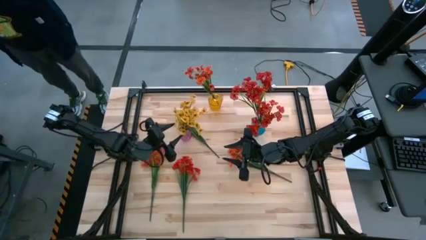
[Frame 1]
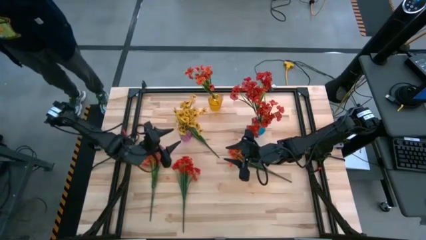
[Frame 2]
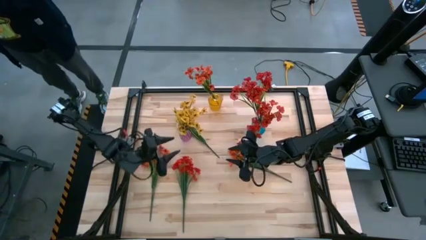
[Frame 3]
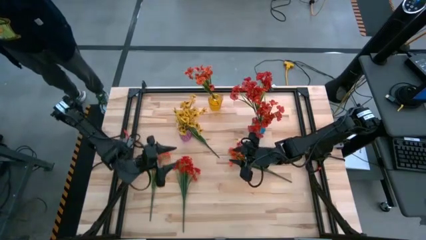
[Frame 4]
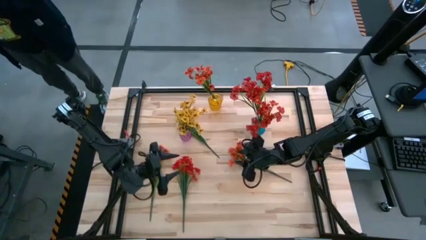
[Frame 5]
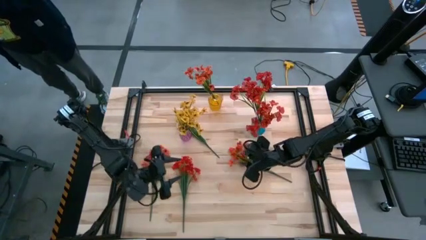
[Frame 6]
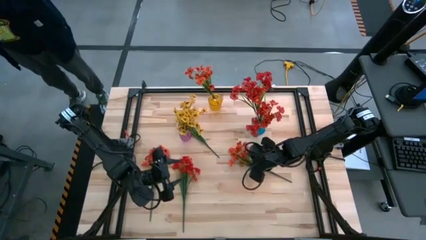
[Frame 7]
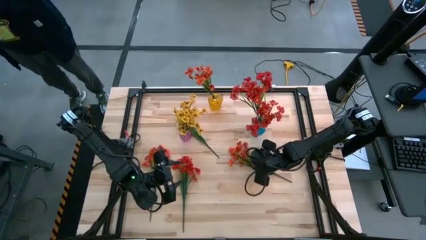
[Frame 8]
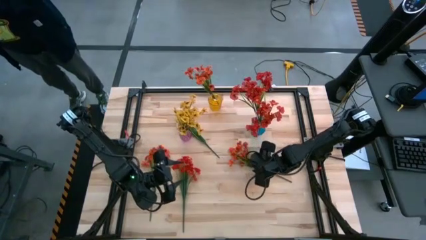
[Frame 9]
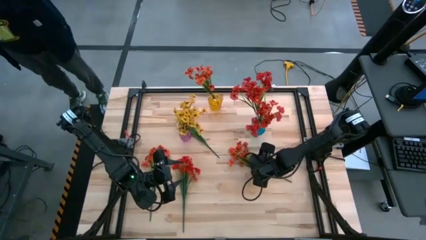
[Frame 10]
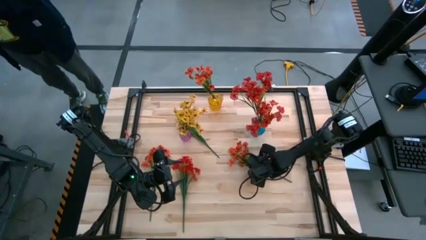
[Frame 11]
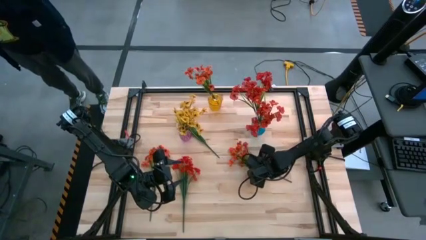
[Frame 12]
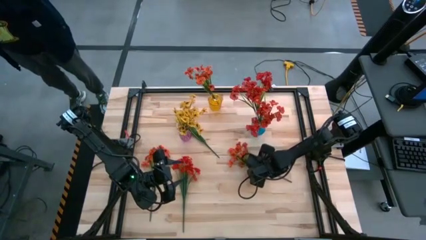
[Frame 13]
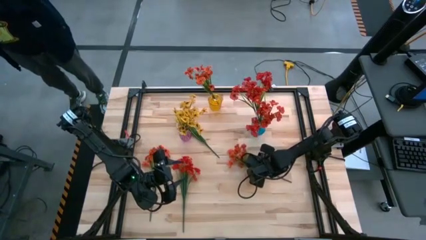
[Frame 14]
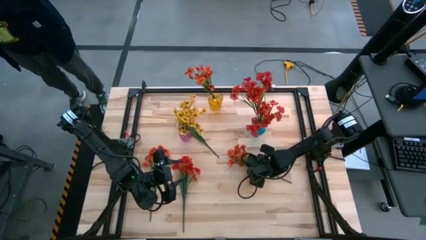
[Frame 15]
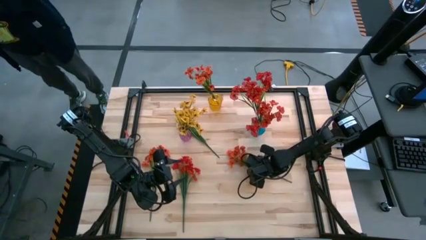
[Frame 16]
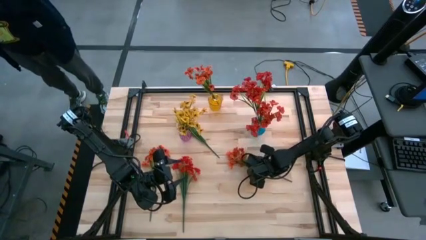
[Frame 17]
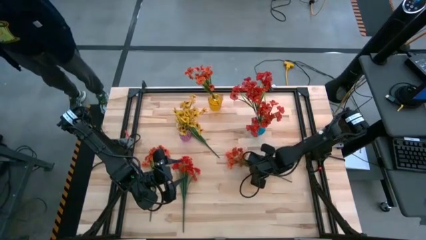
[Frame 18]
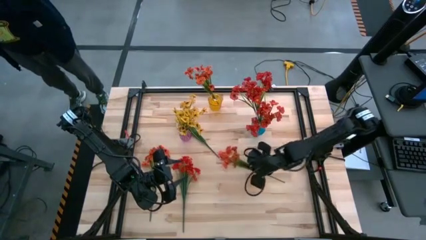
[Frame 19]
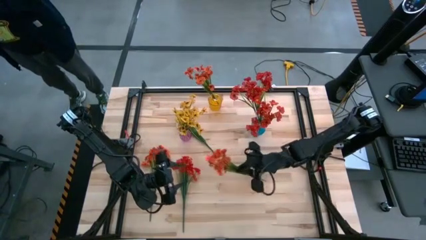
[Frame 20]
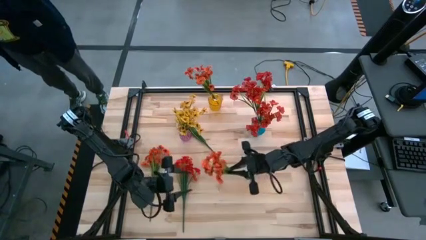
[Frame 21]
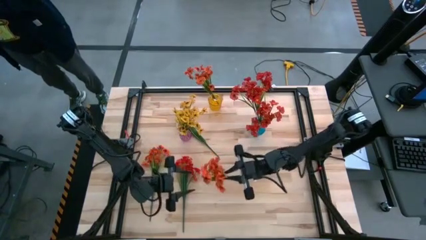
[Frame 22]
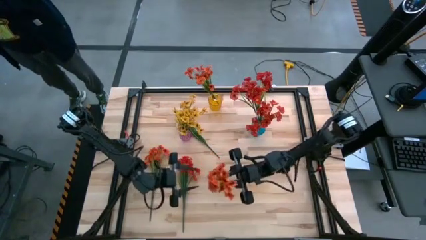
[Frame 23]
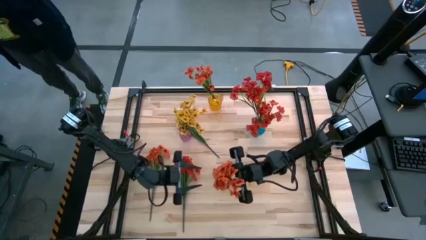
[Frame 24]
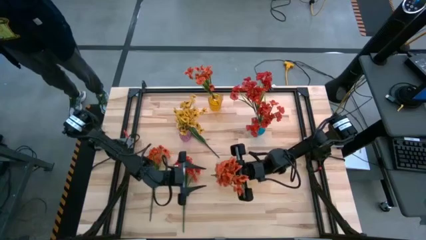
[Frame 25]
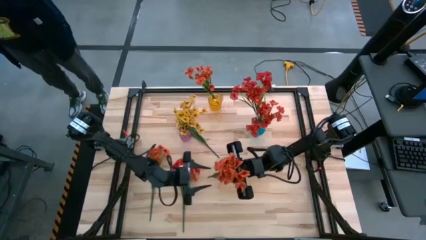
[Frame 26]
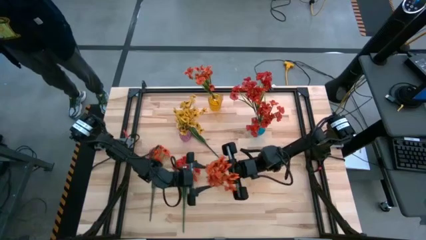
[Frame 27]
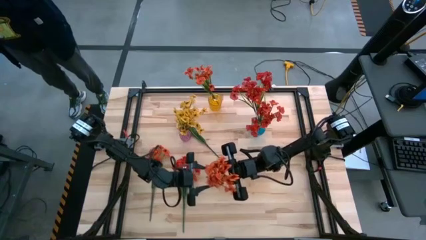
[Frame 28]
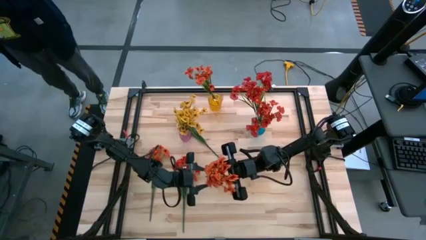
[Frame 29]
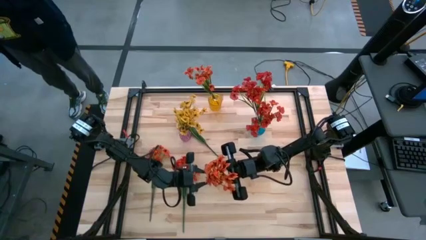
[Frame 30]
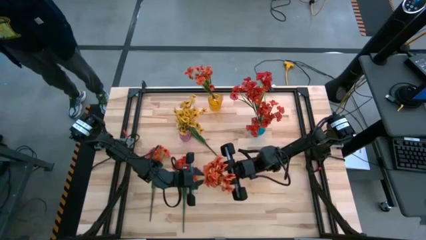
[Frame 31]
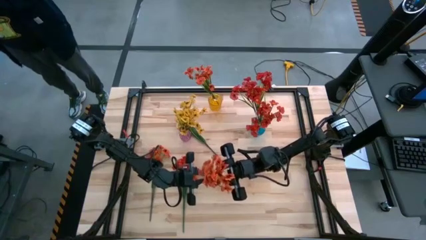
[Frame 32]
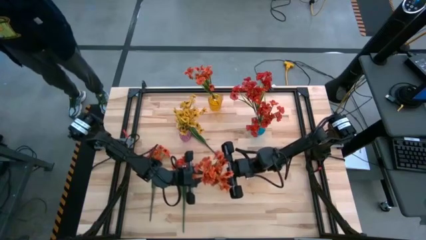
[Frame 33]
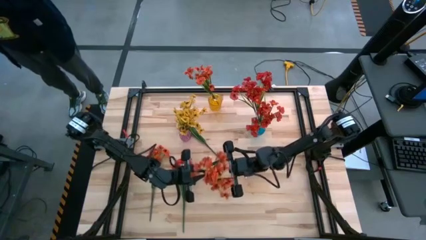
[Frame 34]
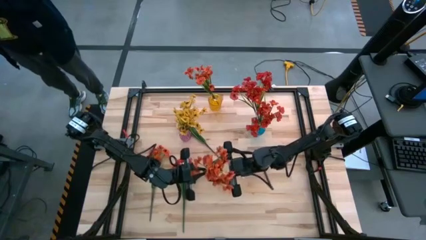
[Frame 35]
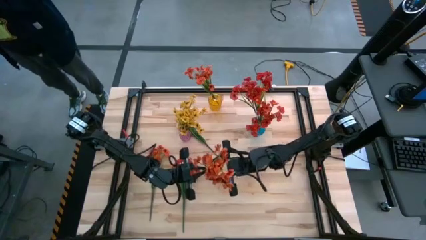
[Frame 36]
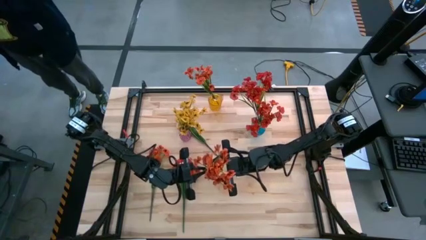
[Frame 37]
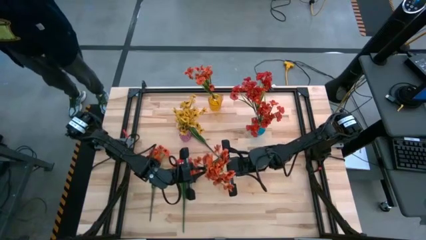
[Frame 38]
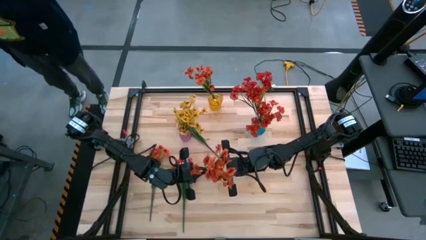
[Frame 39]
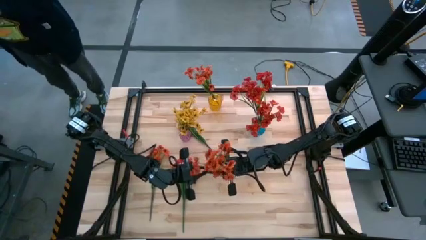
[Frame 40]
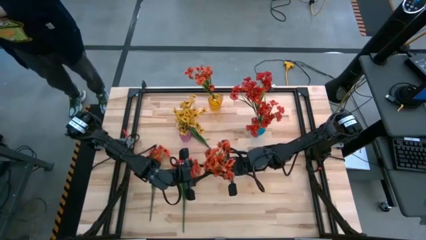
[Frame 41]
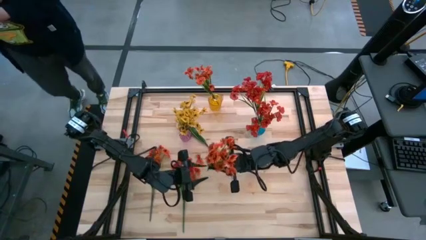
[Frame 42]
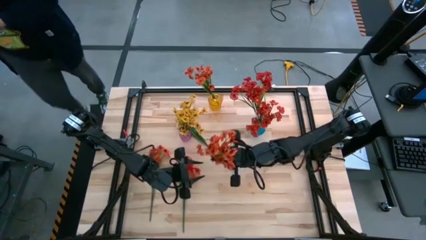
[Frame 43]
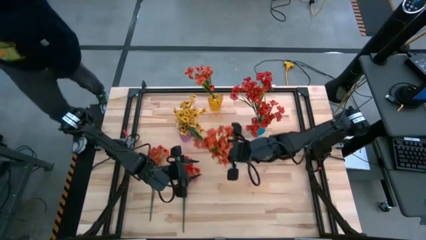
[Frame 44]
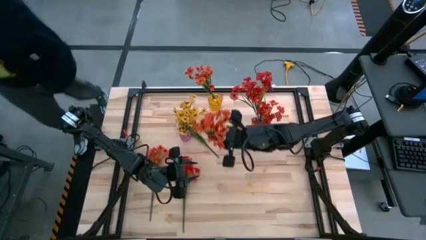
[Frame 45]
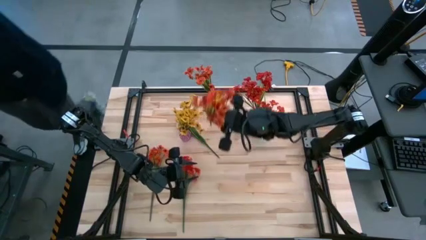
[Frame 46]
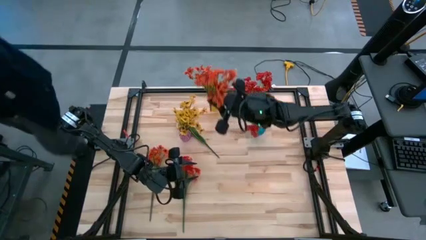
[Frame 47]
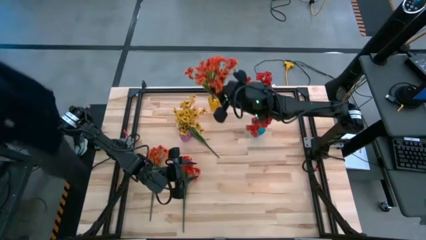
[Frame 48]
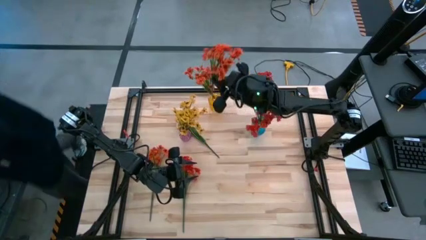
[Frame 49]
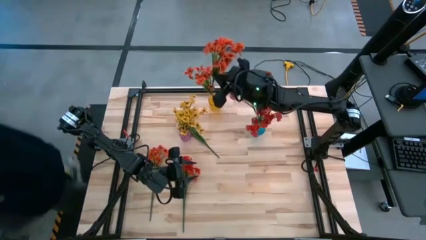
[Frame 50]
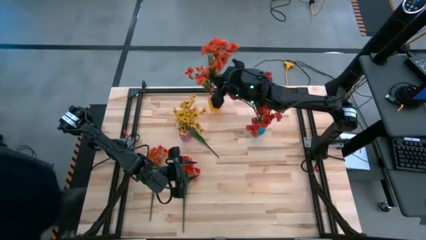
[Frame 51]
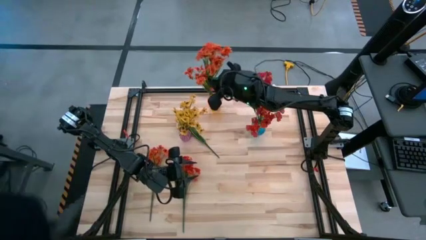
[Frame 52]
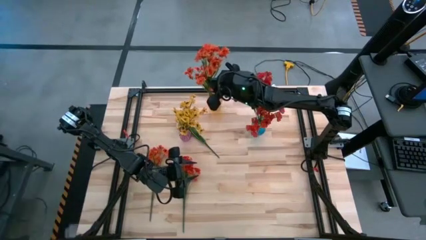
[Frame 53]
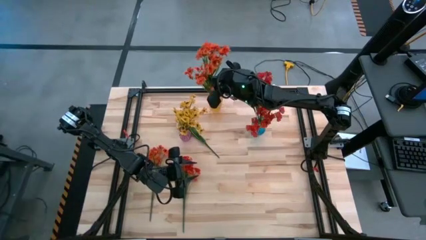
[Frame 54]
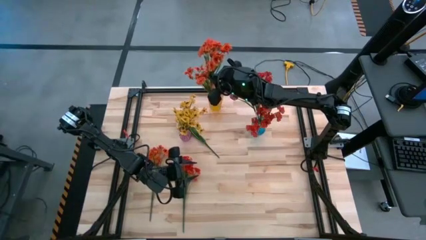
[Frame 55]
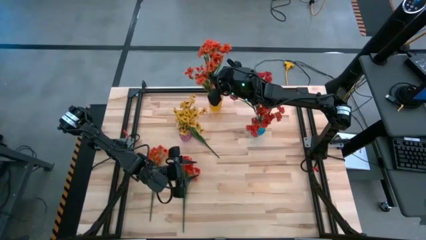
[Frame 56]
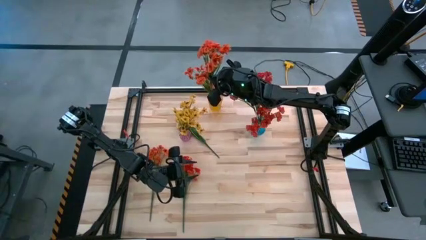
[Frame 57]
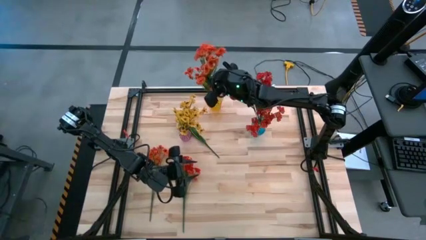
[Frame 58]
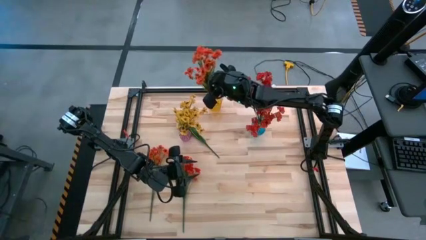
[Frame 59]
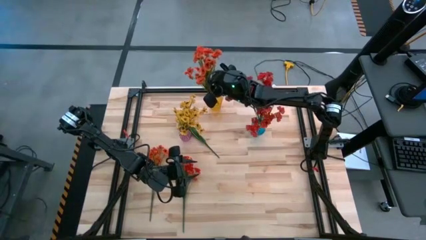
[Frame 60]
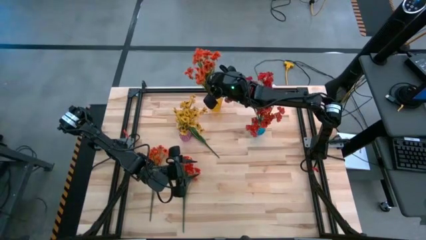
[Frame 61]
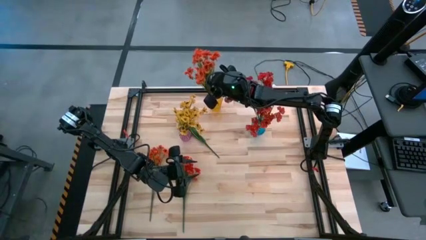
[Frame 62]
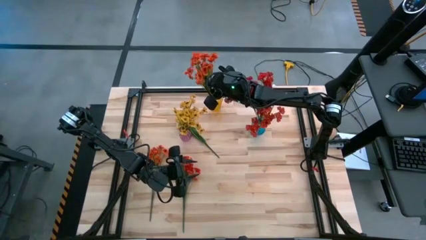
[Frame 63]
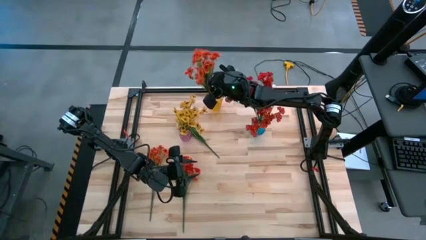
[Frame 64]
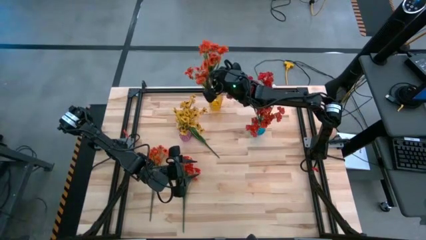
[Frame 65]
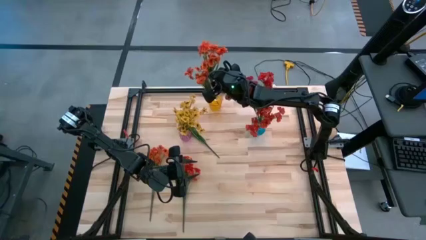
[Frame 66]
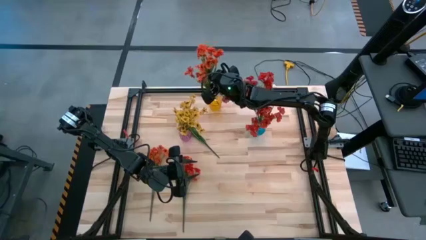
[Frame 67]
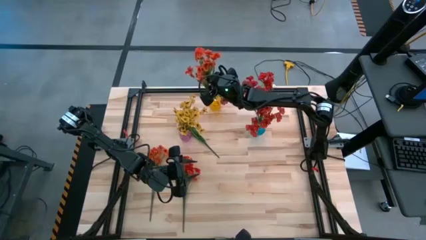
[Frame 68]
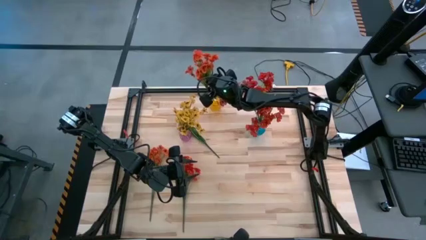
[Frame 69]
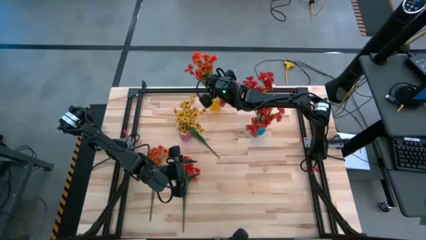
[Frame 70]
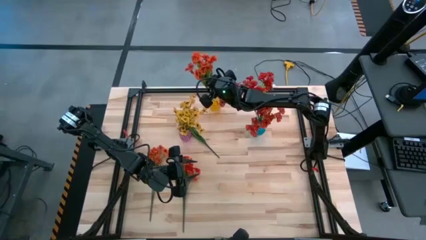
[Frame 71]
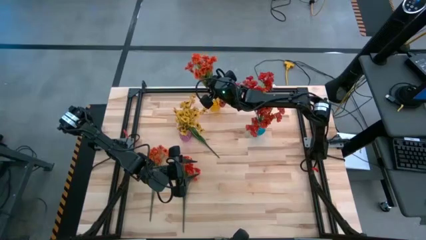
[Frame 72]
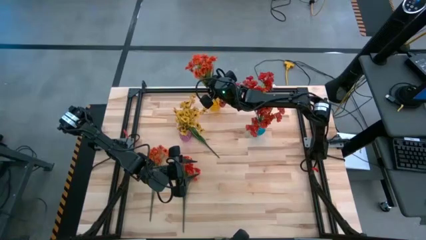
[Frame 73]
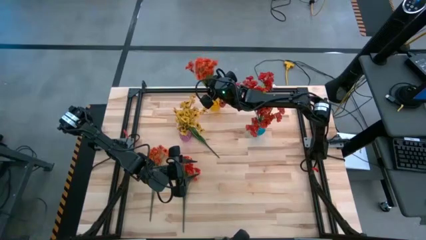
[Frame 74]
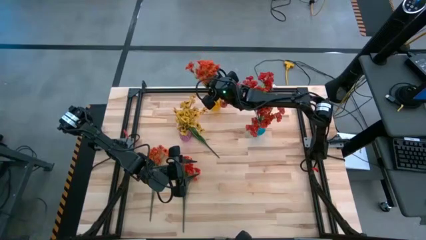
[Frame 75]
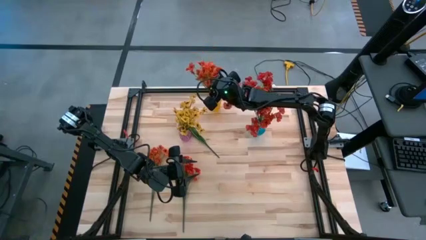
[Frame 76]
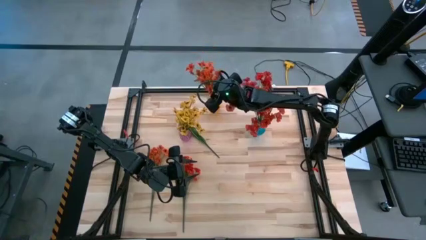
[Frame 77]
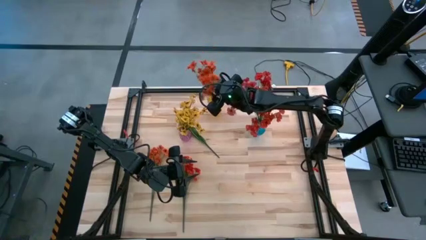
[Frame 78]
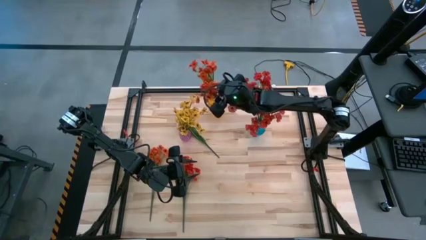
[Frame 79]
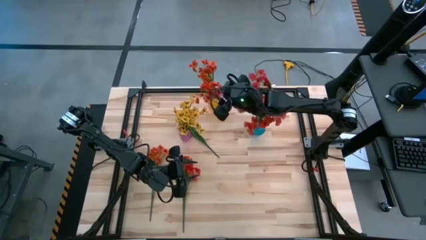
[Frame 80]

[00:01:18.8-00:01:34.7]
Task: Sort flowers into vase by color
Put the right orange flower into the yellow vase

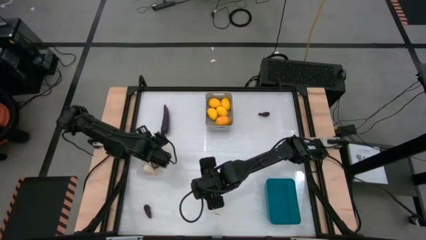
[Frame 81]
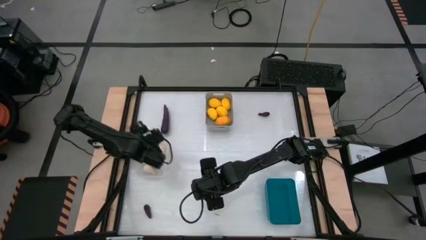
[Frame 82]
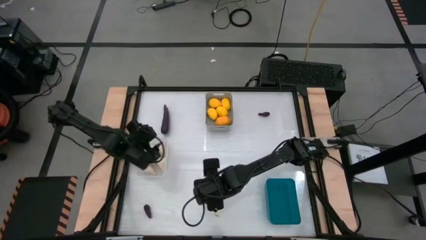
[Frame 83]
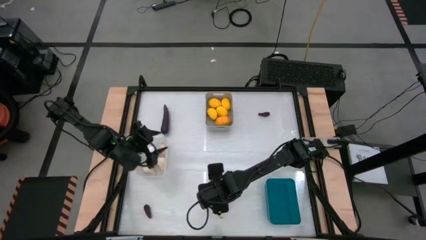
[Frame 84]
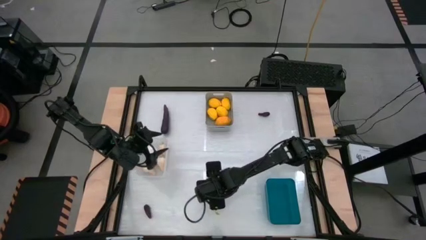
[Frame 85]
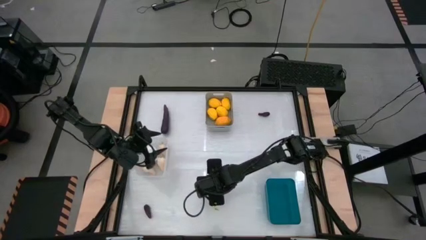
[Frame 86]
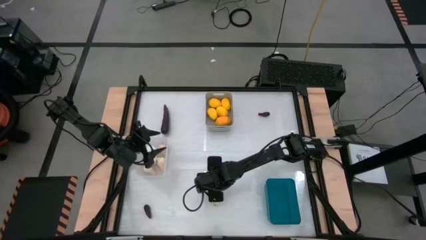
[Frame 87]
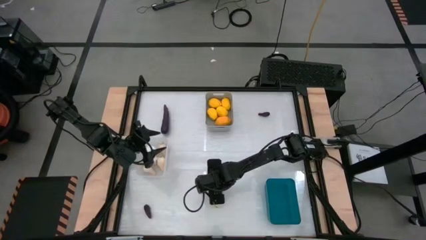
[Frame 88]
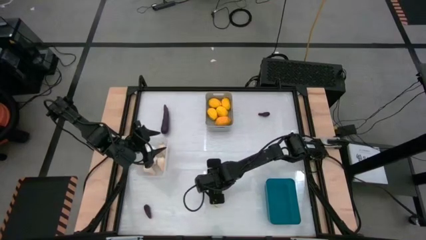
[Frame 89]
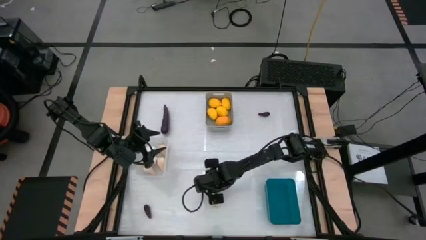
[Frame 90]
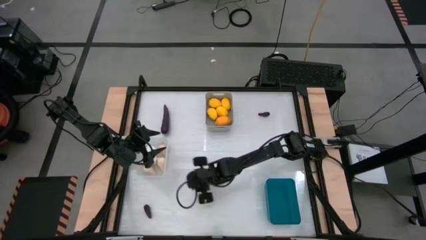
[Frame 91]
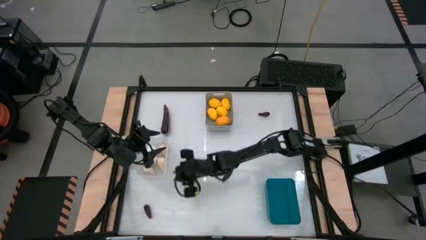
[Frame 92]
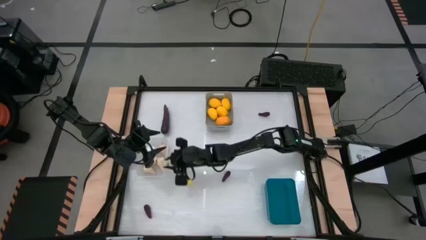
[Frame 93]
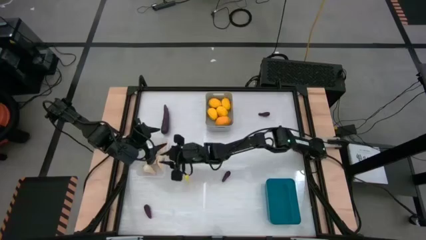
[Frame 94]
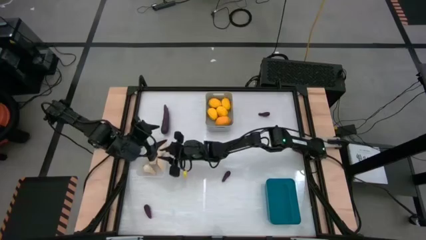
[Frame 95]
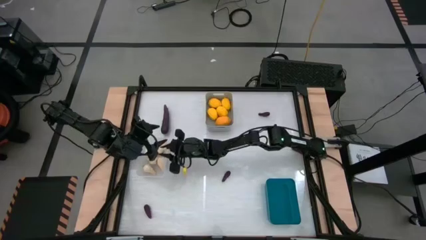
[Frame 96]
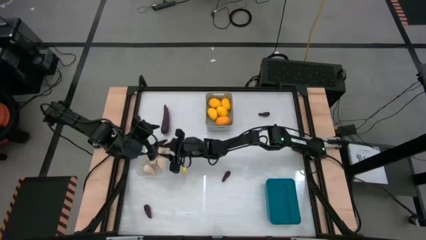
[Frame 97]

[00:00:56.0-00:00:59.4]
Task: Sort produce into baskets
Put the garlic into the transparent bin
